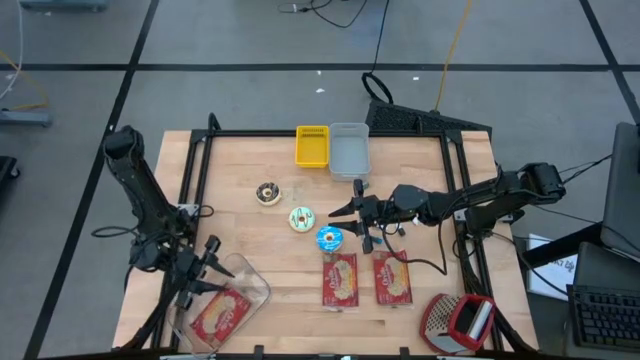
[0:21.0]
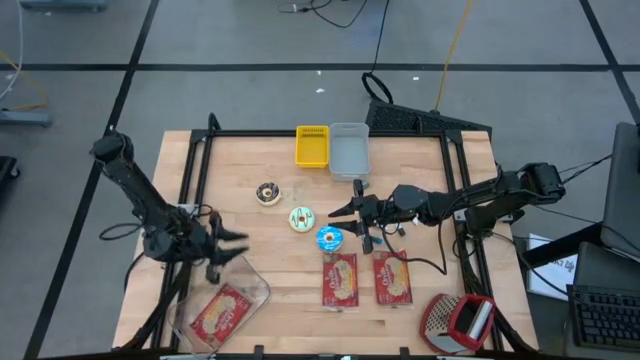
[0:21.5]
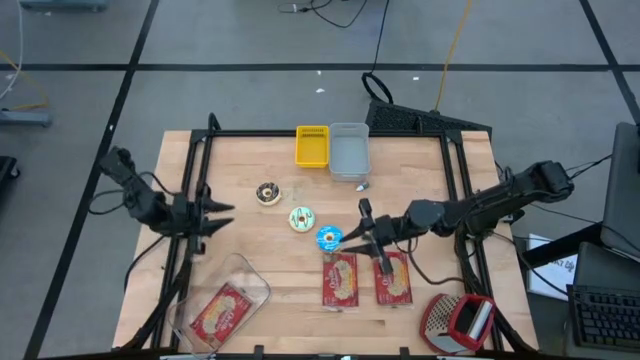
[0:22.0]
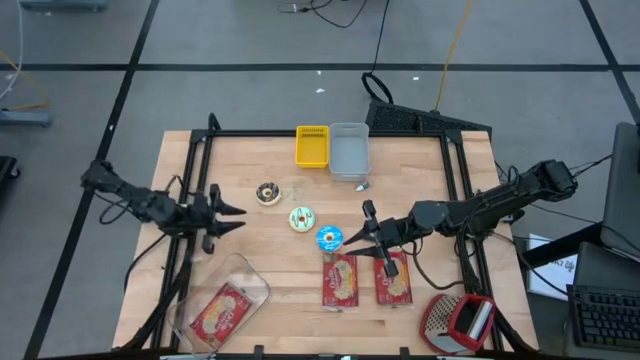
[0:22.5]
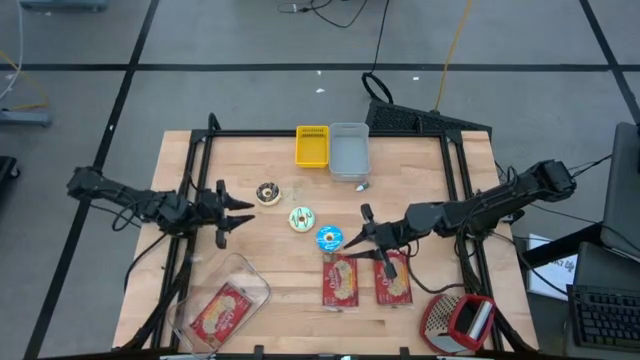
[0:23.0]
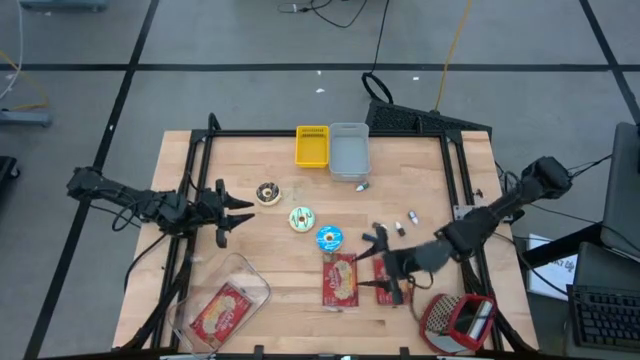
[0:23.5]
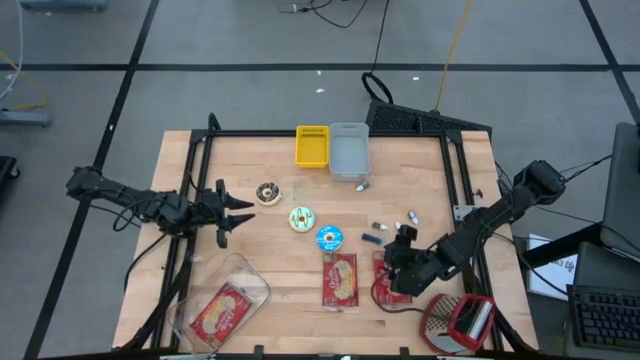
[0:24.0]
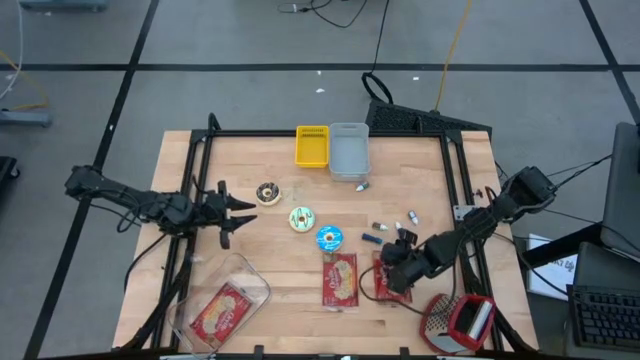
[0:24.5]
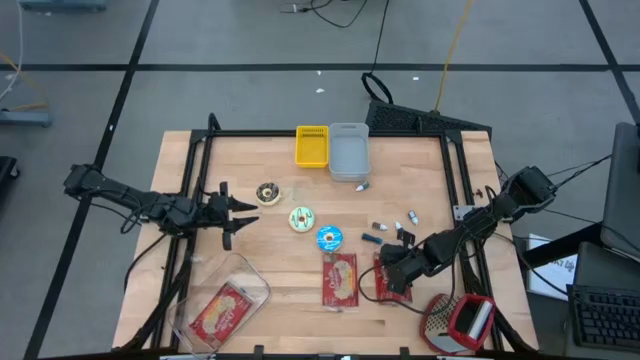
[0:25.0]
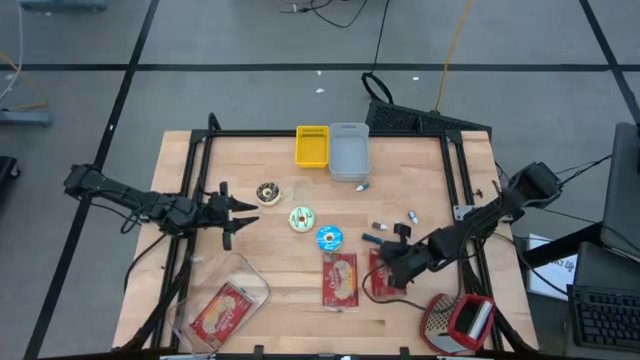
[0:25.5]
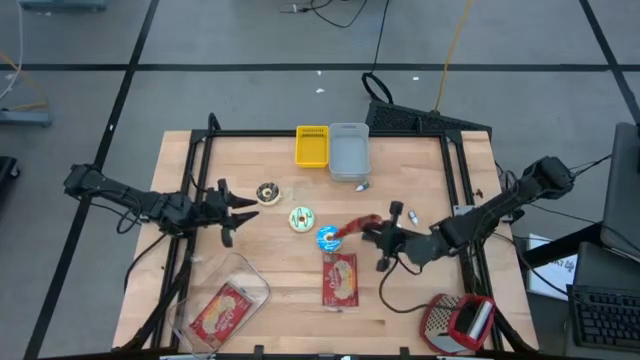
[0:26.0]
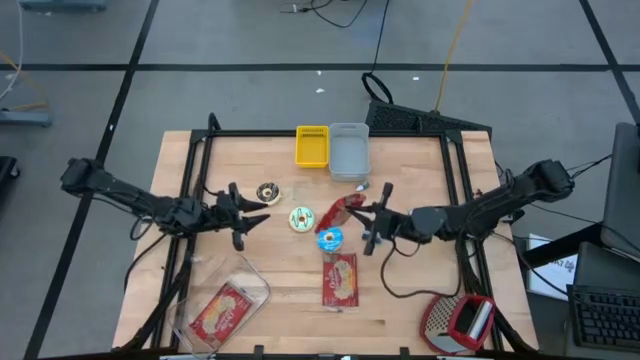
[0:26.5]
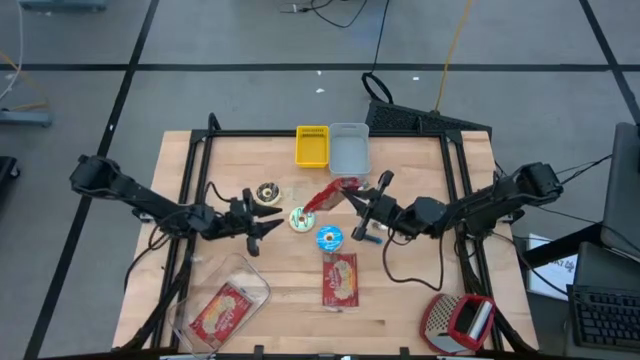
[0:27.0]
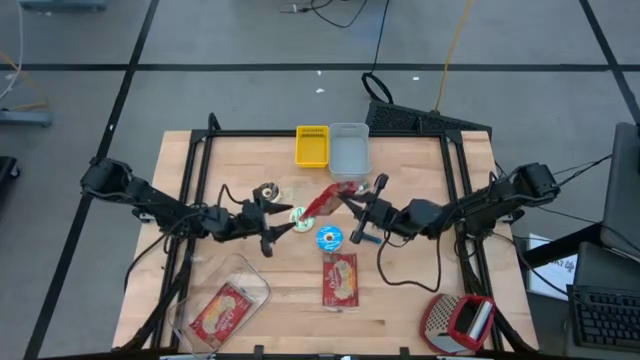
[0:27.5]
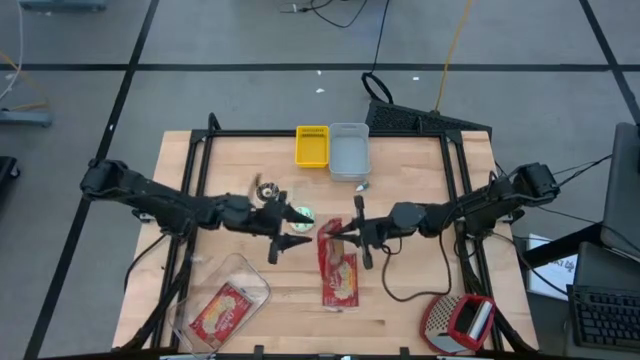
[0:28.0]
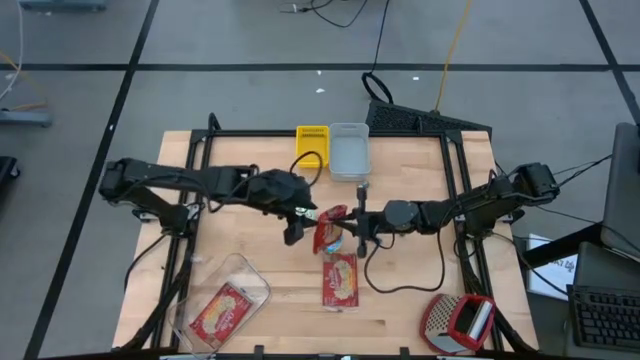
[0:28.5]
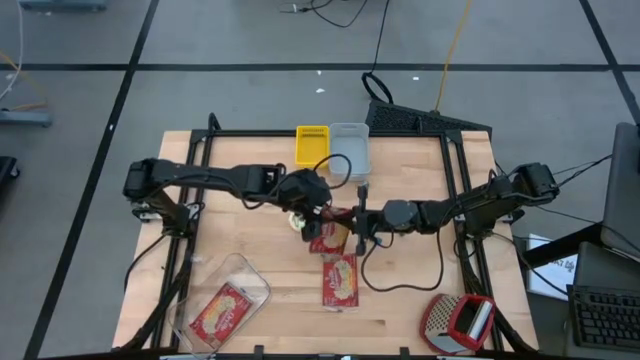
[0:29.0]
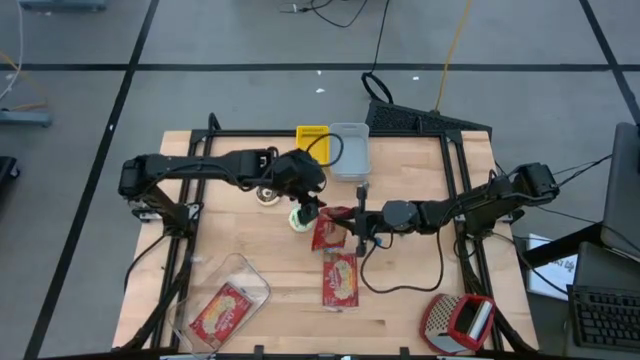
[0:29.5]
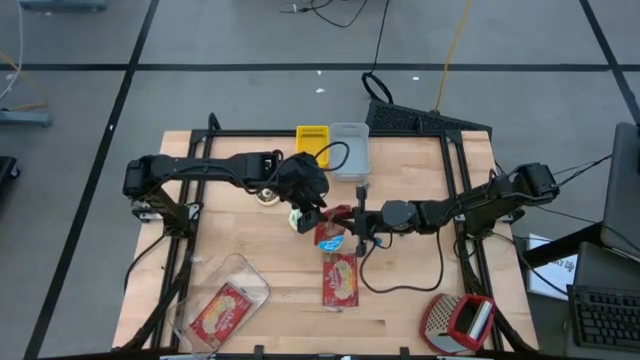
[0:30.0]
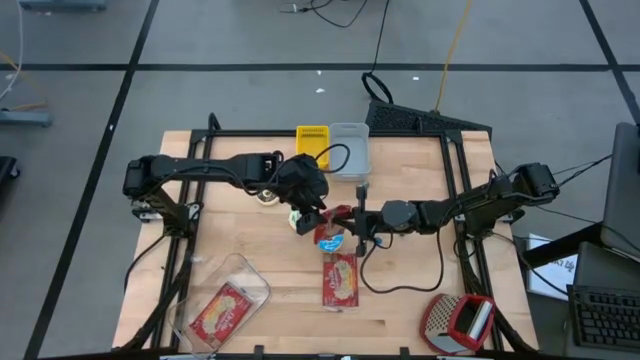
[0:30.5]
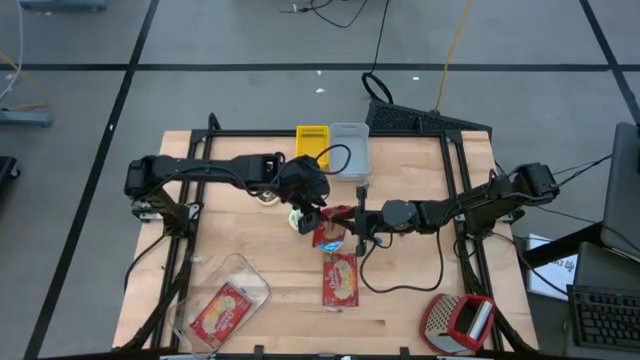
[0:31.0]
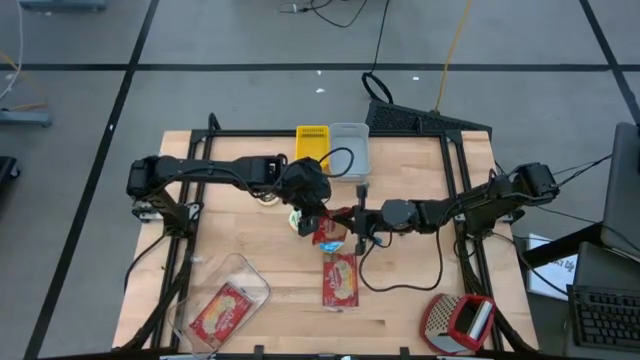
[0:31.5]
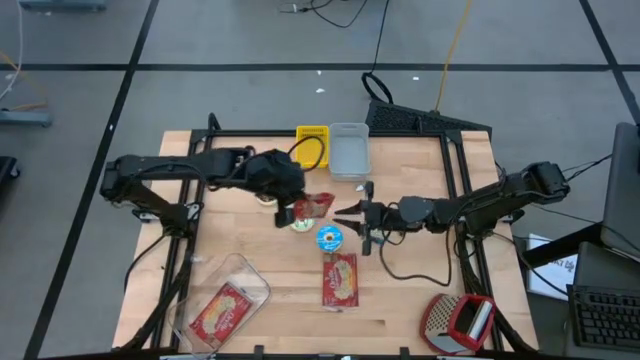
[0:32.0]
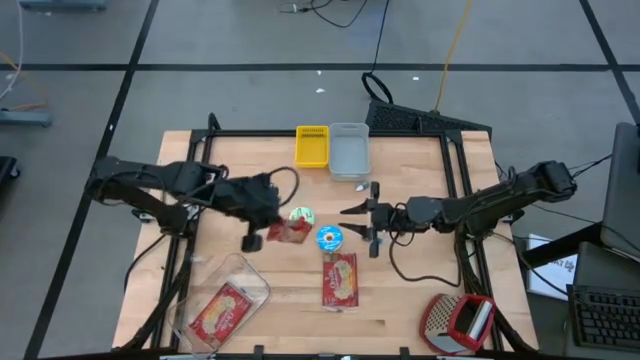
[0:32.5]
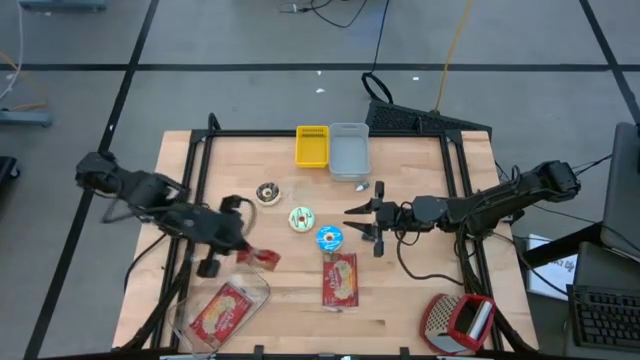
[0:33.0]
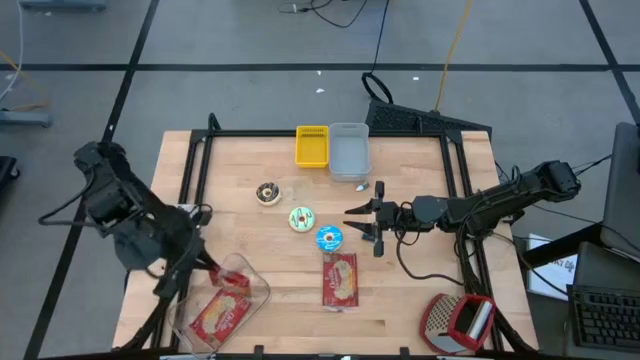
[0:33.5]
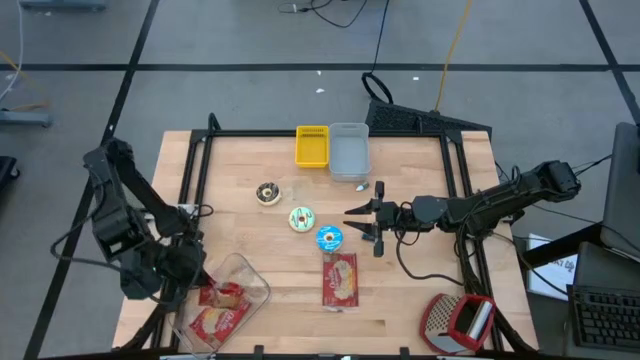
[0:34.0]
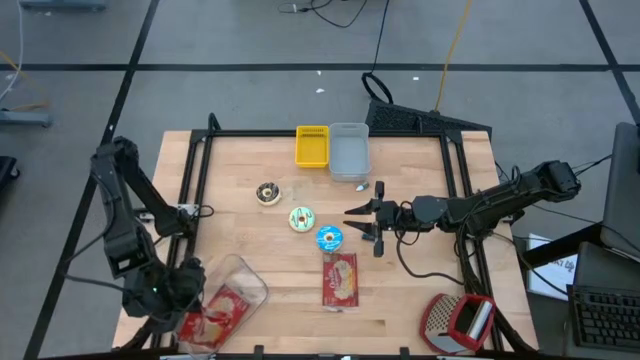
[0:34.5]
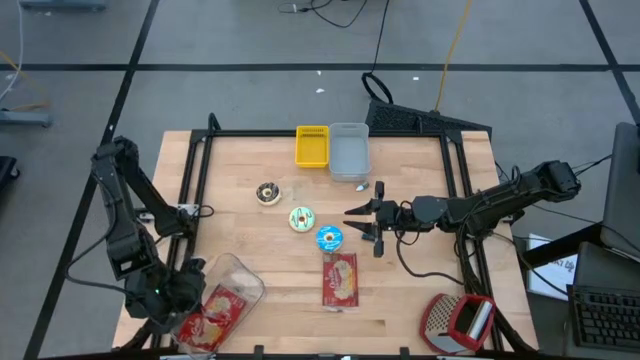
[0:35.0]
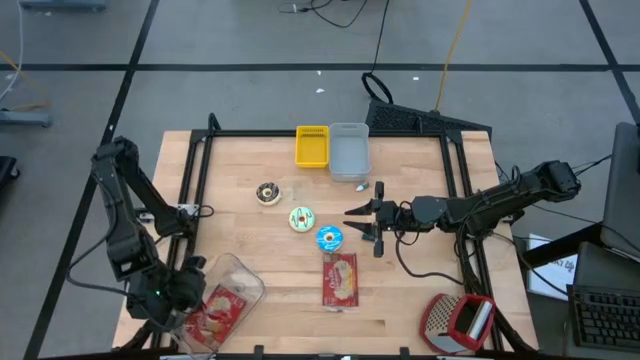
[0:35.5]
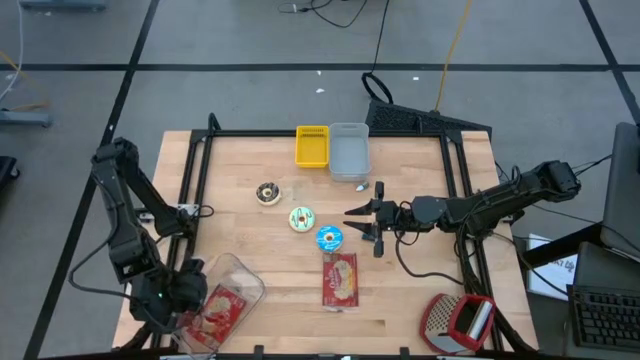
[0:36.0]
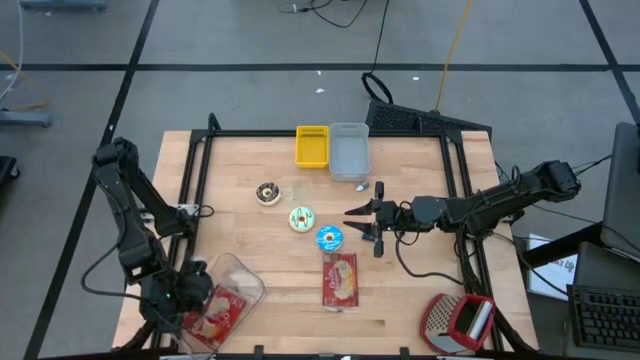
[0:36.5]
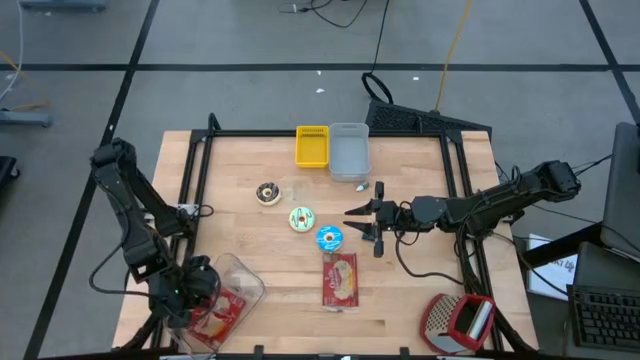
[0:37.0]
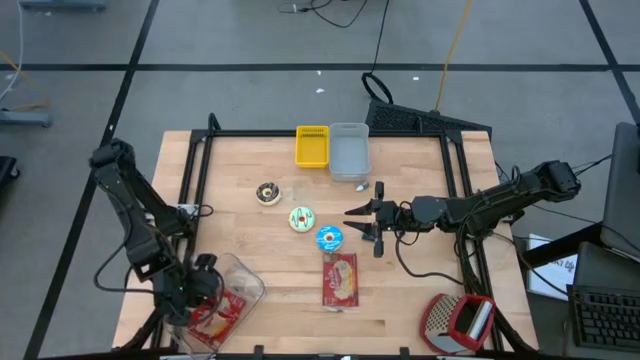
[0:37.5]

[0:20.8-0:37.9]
Stack the right red popcorn bag on top of the red popcorn bag in the transparent bin
